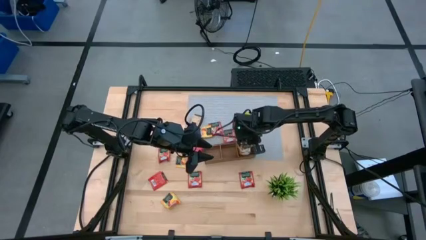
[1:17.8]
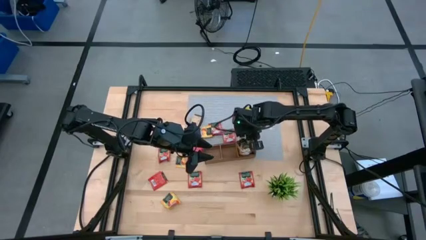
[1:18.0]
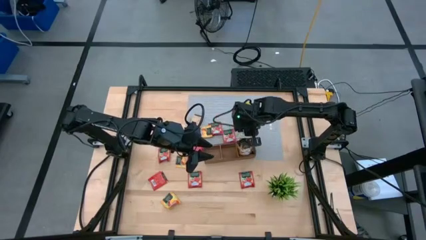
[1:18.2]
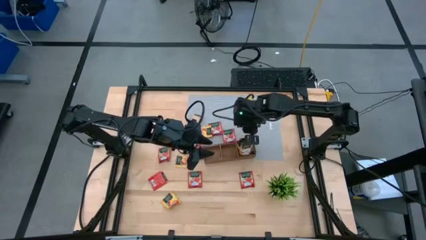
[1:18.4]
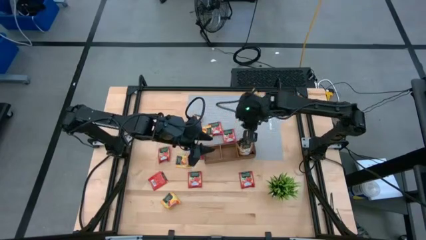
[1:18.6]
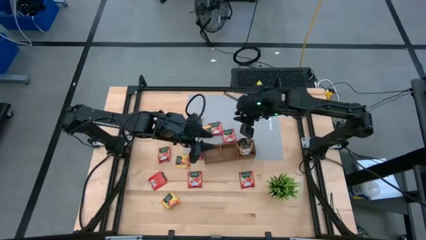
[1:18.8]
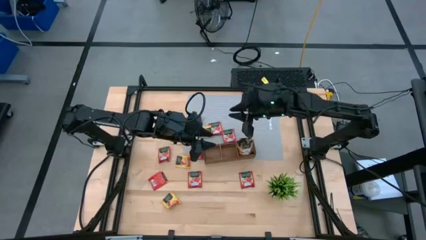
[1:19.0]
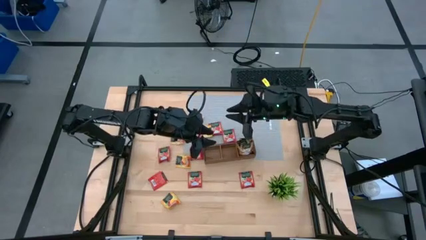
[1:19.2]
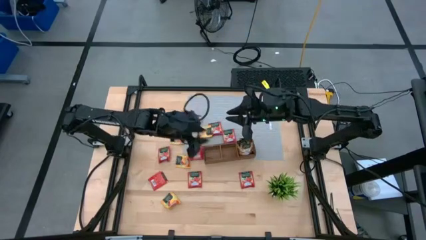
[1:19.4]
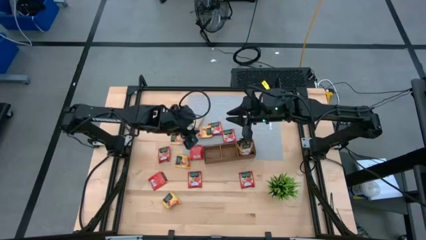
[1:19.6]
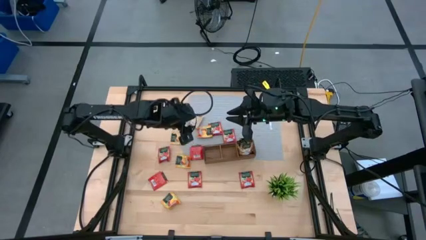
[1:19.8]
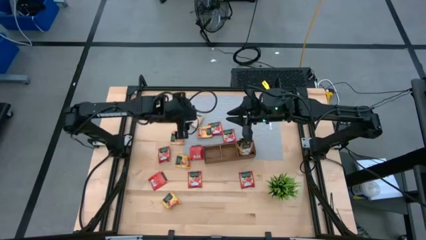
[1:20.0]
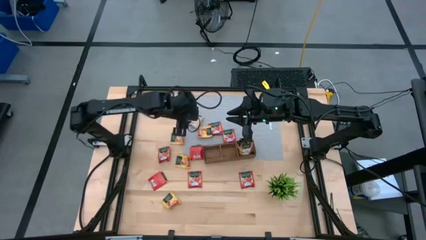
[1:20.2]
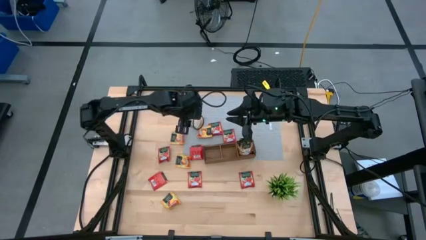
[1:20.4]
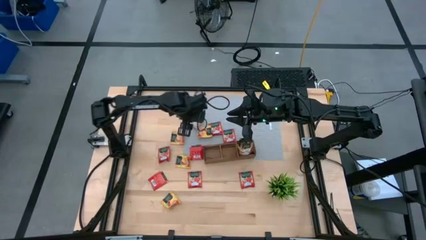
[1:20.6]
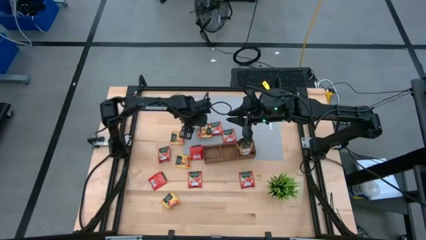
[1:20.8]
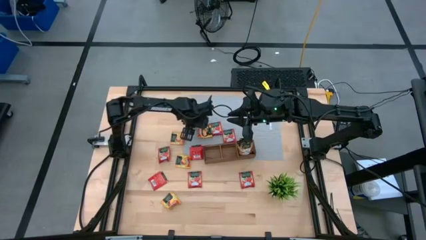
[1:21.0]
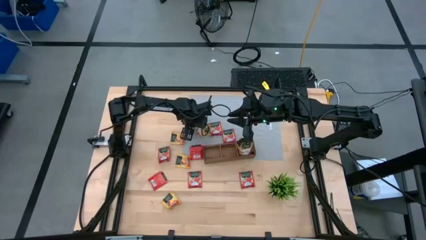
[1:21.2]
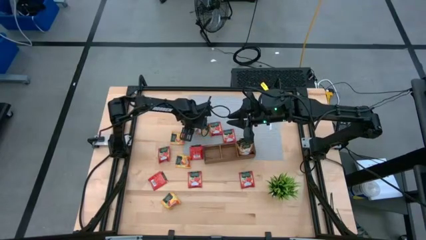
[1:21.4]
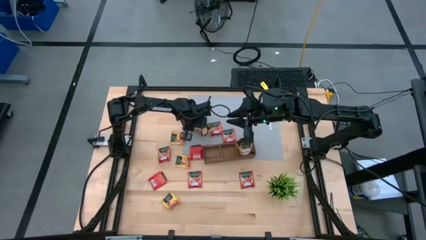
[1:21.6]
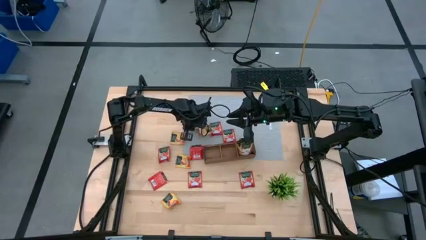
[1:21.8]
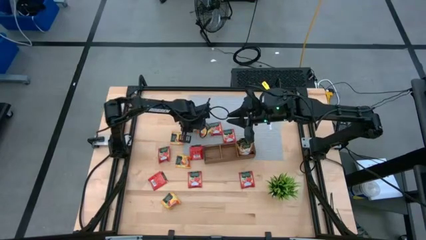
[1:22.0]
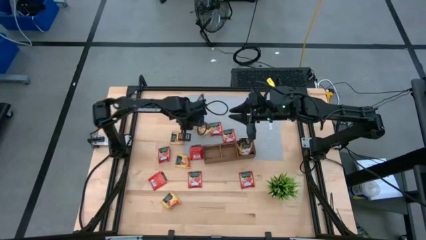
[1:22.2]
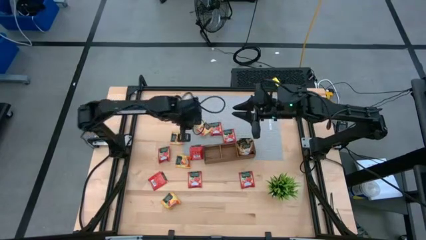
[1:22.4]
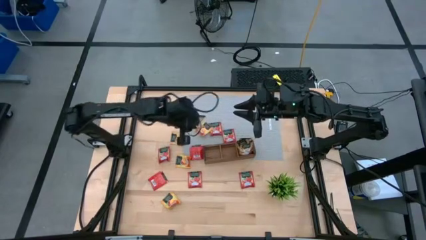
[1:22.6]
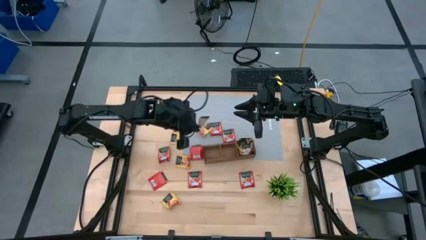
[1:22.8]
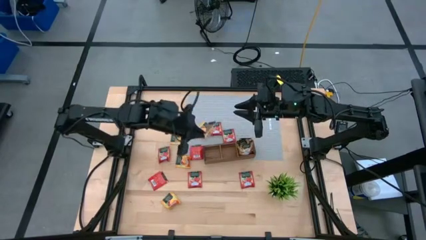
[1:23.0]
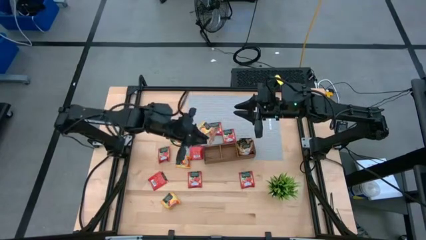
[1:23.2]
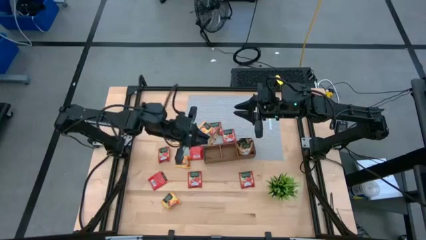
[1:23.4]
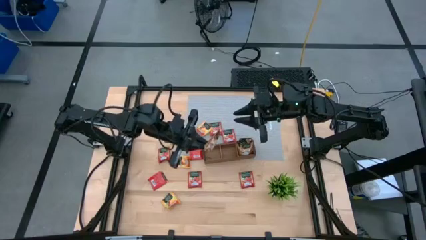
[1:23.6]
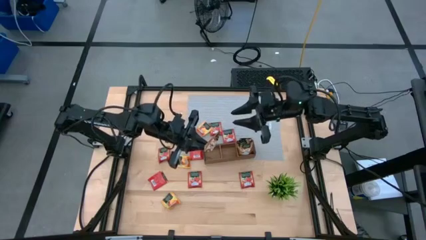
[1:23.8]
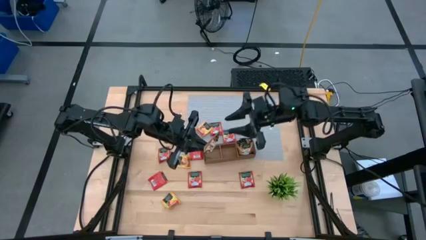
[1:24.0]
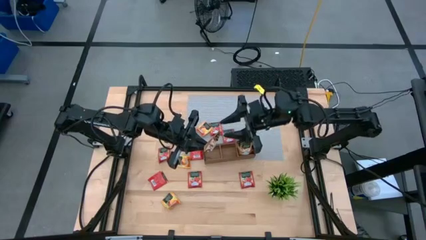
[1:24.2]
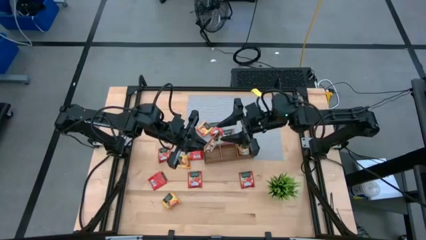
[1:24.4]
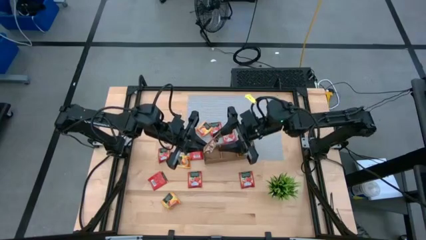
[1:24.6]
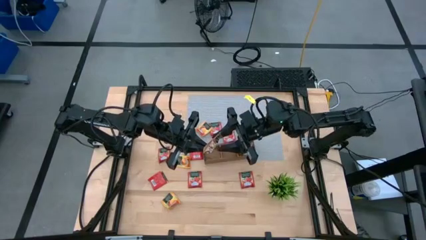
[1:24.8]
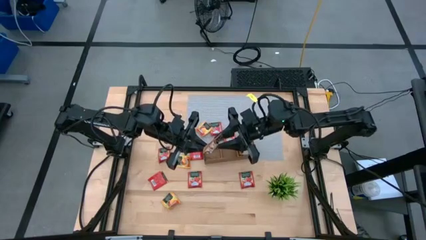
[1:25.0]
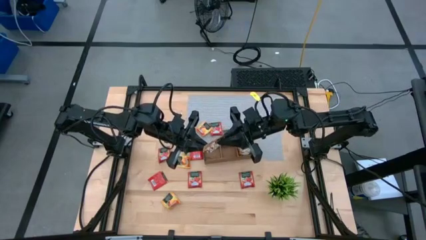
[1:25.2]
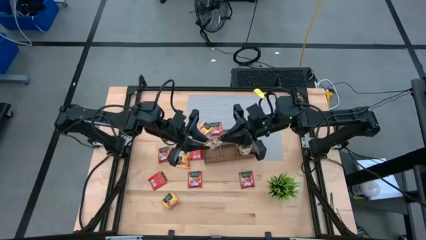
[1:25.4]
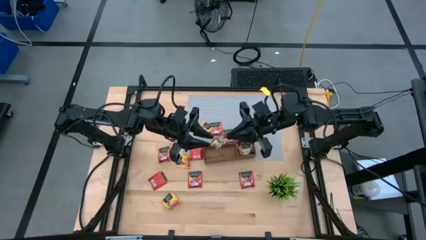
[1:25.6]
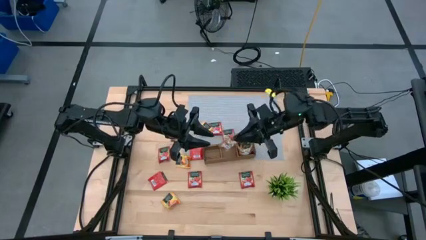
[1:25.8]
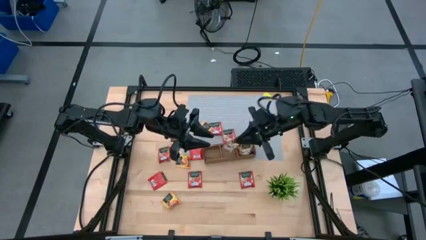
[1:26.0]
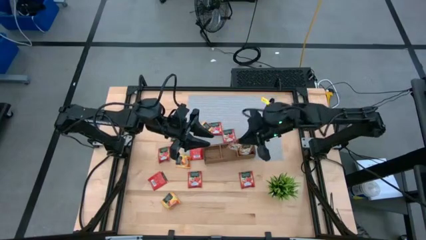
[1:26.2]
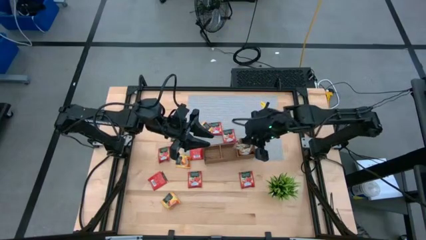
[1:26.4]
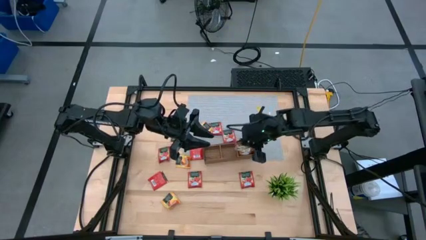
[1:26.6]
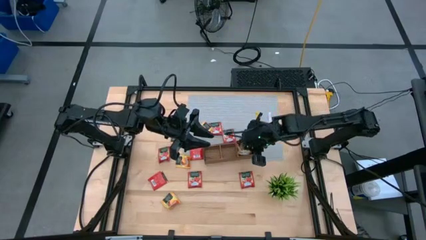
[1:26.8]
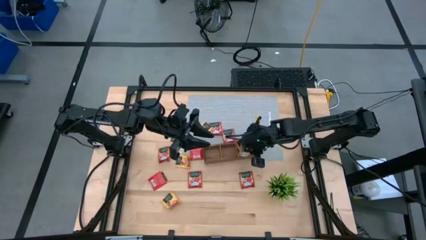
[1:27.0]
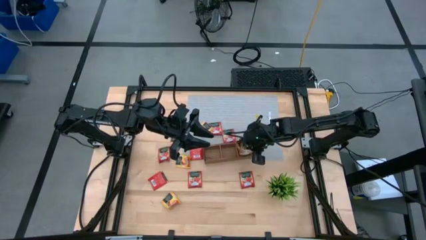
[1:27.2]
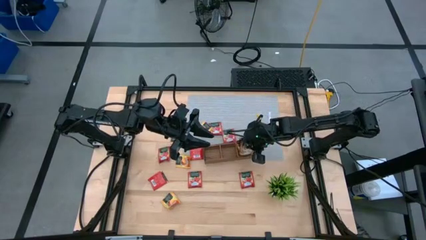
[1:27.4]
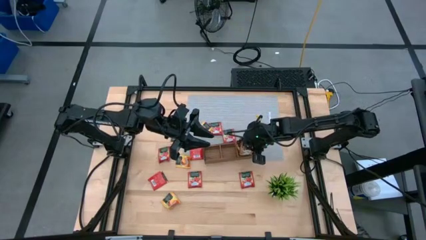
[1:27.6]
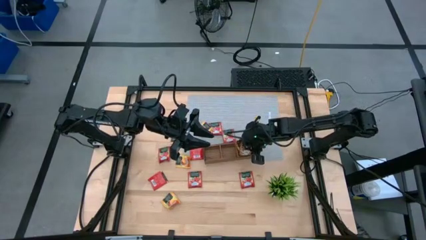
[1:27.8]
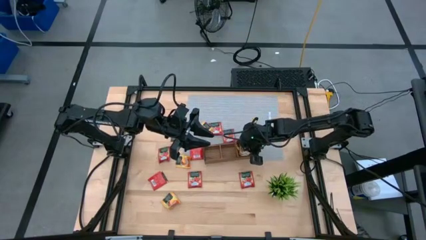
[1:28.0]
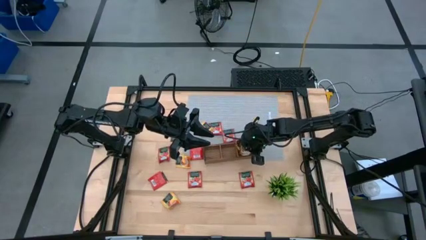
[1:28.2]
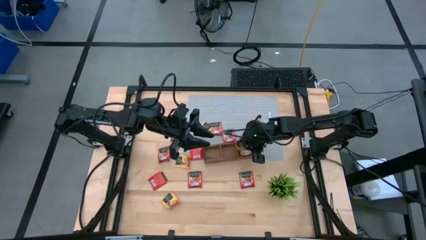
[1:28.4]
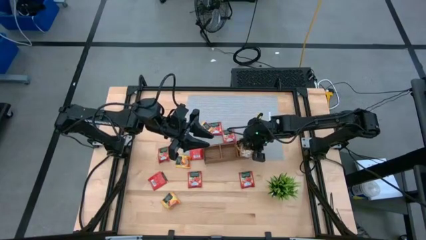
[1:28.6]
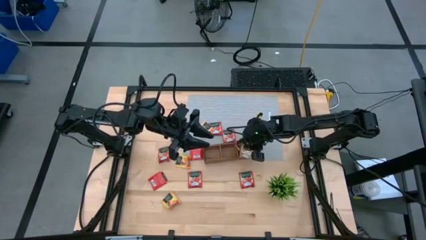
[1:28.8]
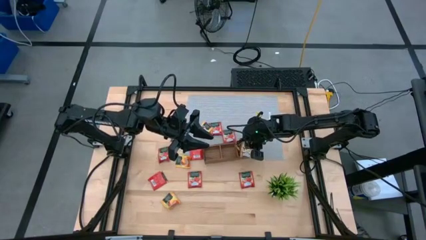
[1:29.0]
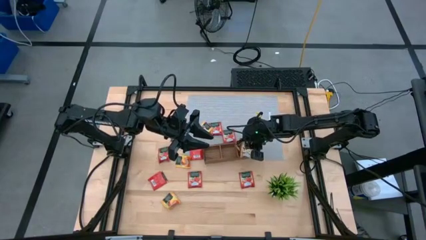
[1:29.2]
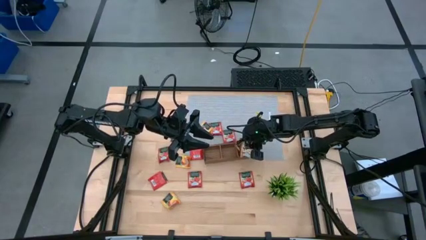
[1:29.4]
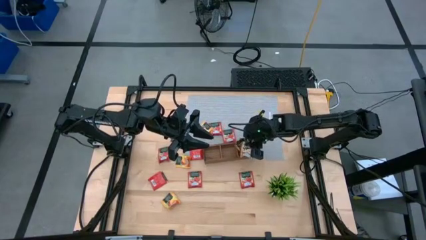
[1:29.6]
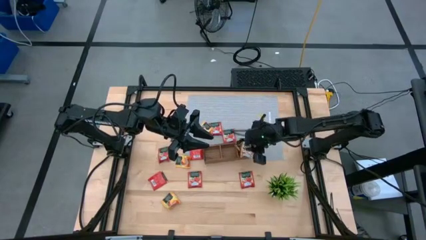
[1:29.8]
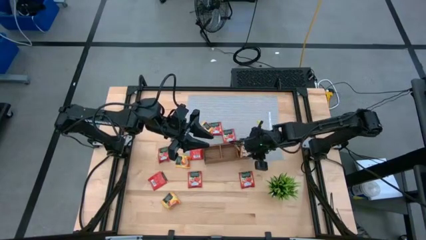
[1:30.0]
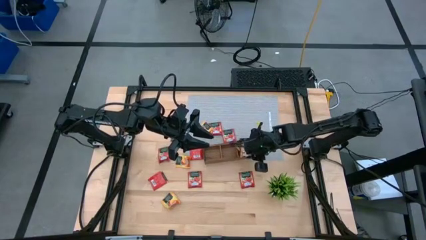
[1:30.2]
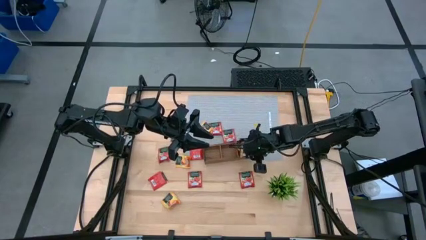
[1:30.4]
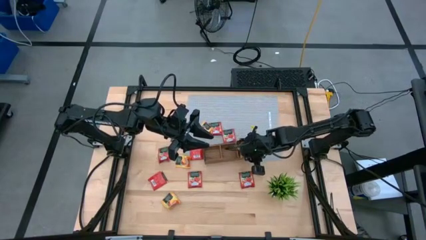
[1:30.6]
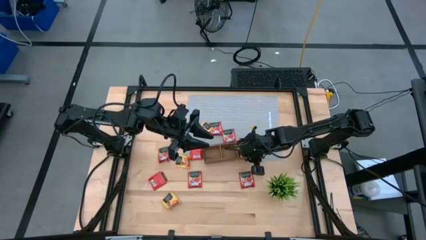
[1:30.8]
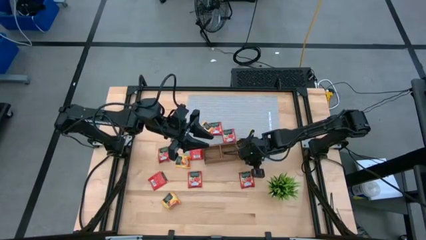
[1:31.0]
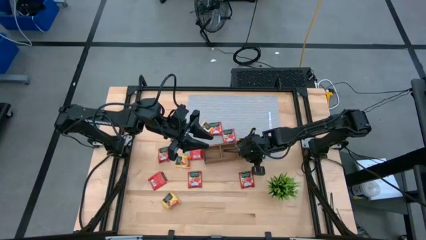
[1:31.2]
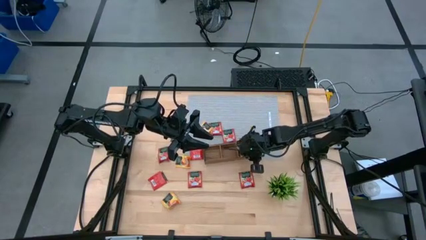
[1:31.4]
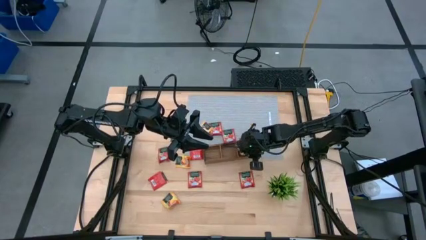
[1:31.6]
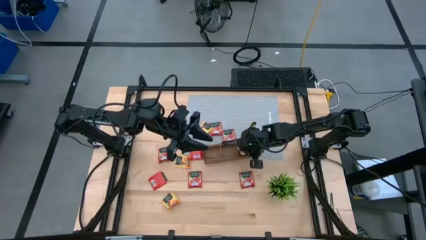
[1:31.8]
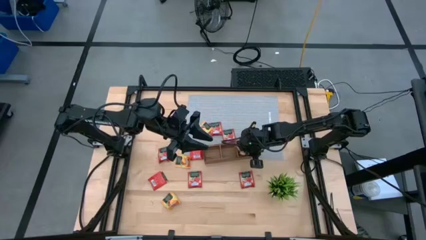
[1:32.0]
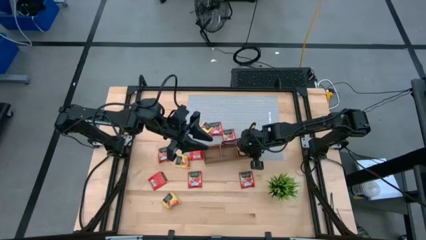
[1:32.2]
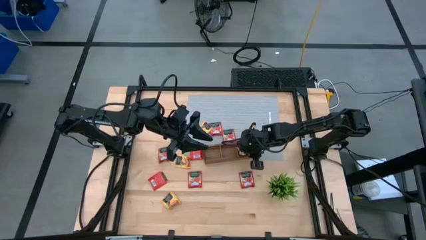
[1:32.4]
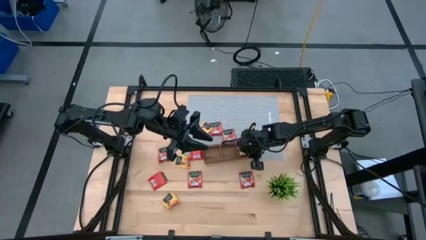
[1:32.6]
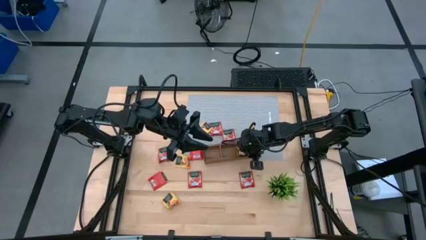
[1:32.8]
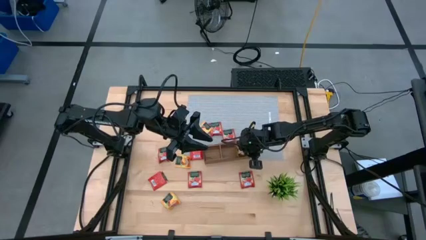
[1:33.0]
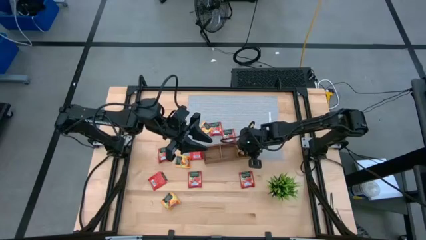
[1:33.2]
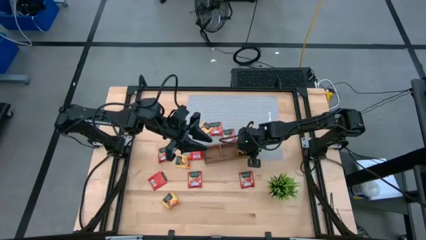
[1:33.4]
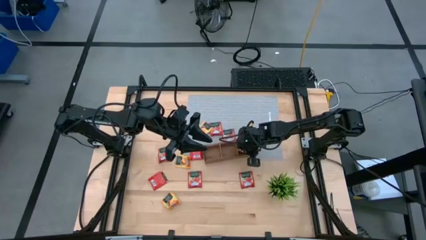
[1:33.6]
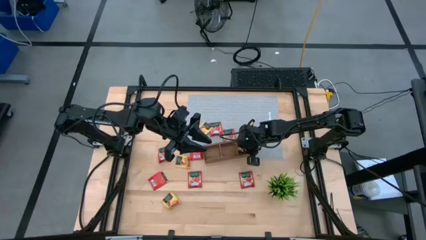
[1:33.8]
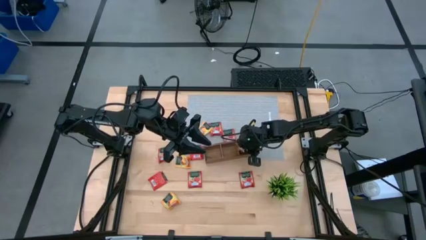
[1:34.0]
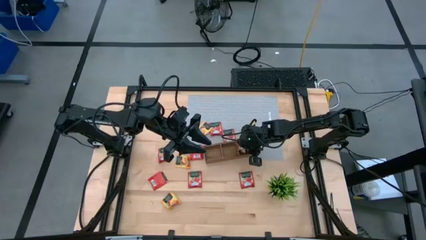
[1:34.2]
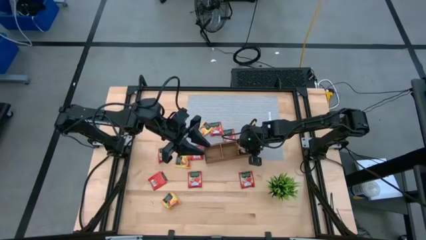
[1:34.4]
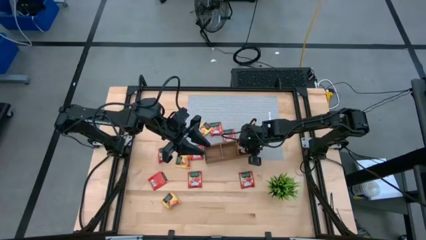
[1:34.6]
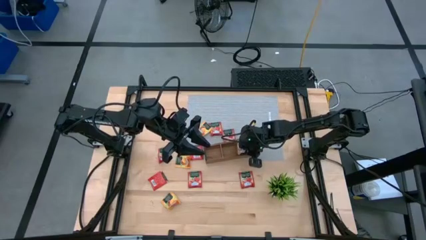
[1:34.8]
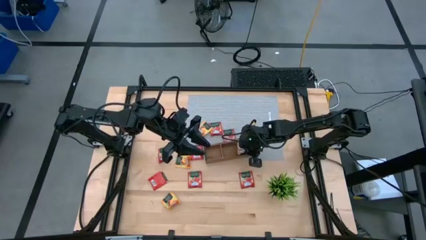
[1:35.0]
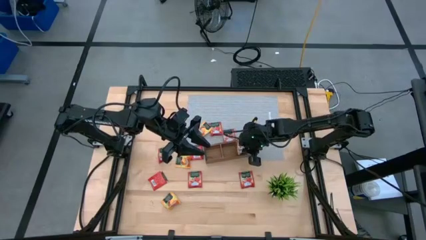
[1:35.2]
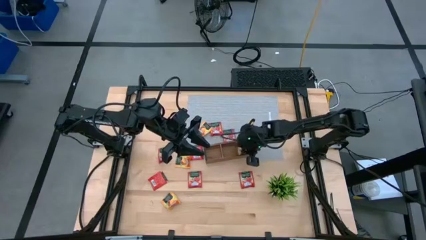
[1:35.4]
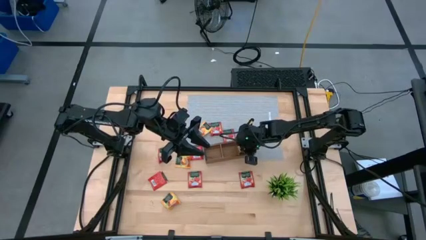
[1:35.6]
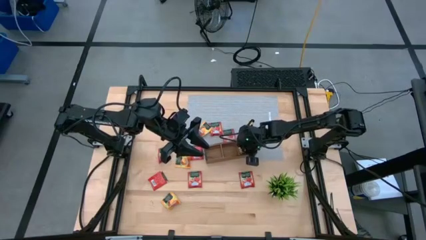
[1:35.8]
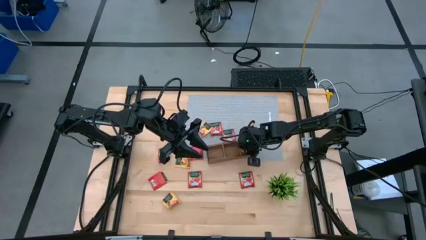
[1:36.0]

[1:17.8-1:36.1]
Task: Pick & Place Tea
Put the brown tea bag into the right section of the wooden organizer
